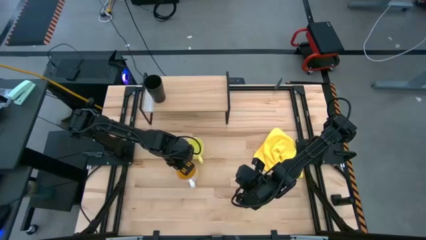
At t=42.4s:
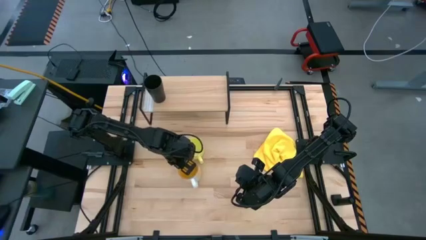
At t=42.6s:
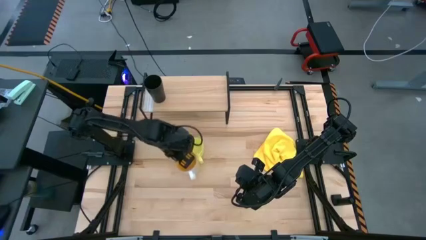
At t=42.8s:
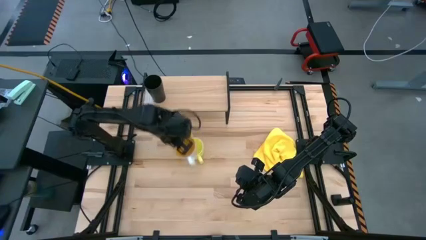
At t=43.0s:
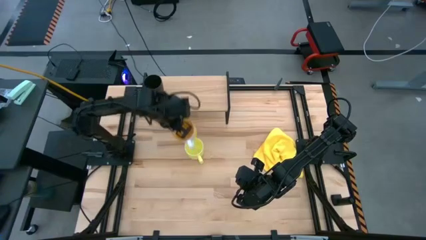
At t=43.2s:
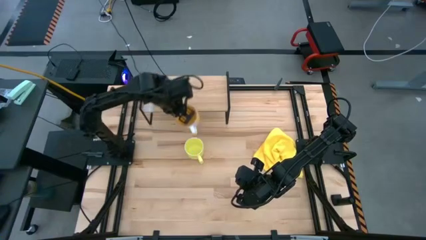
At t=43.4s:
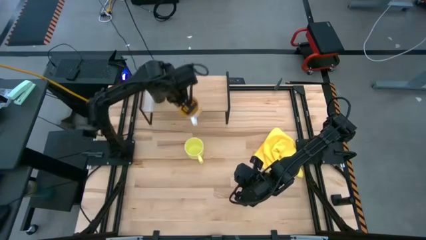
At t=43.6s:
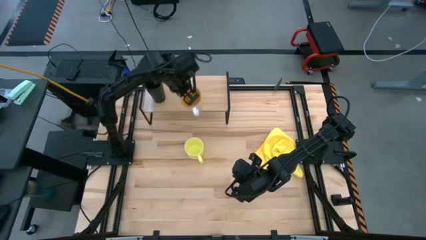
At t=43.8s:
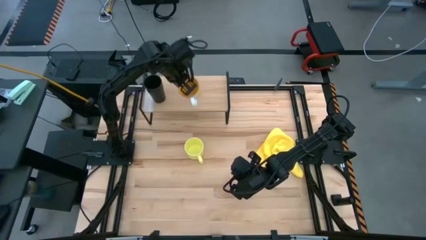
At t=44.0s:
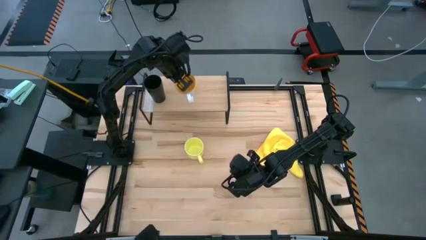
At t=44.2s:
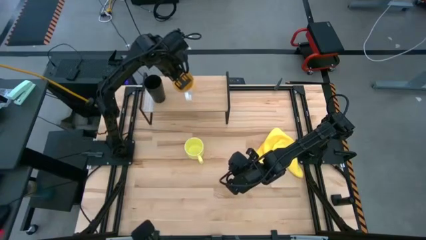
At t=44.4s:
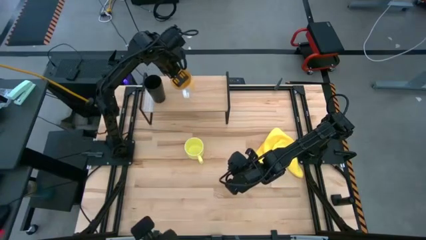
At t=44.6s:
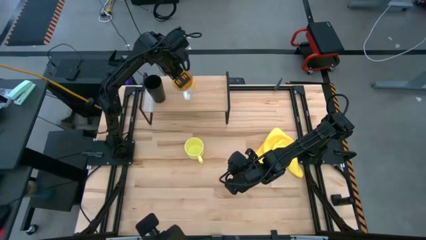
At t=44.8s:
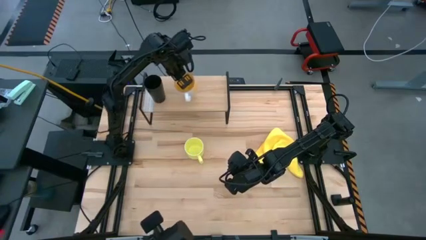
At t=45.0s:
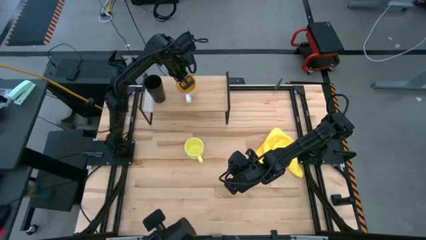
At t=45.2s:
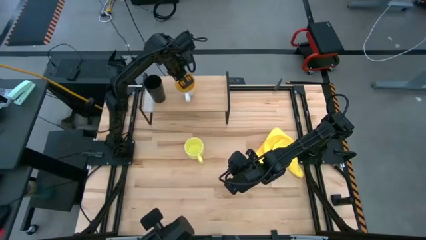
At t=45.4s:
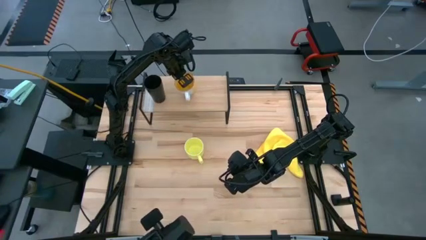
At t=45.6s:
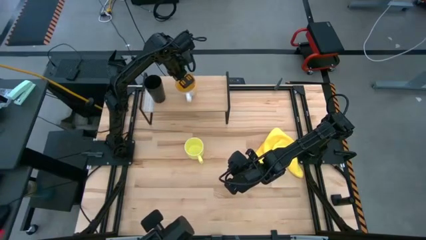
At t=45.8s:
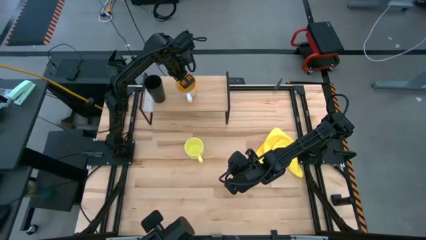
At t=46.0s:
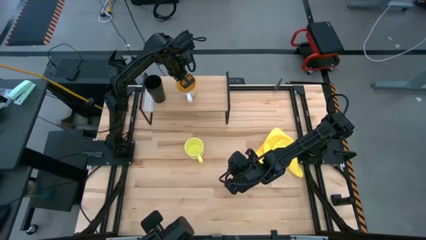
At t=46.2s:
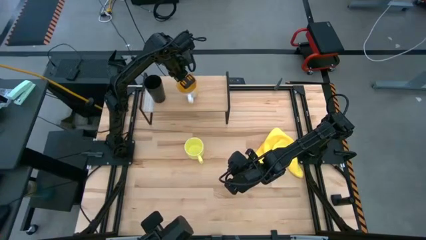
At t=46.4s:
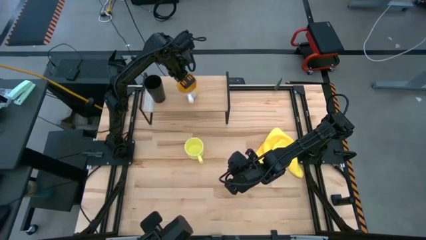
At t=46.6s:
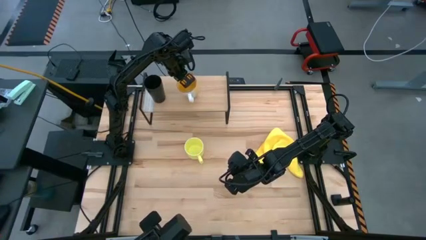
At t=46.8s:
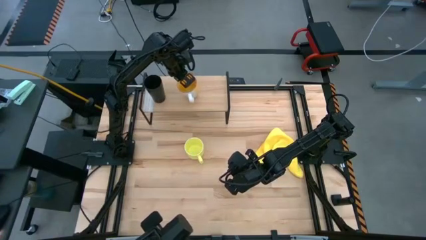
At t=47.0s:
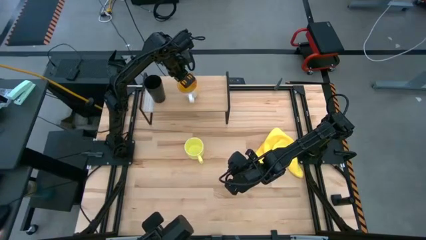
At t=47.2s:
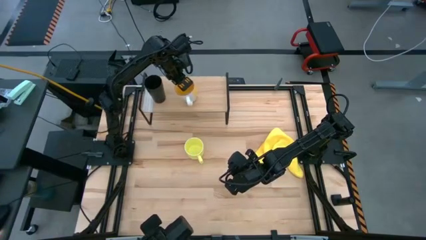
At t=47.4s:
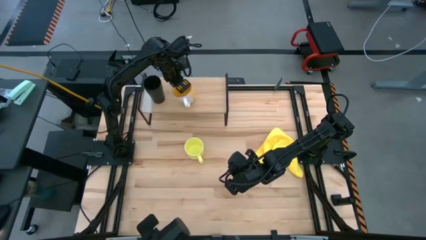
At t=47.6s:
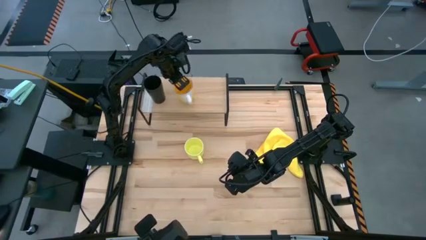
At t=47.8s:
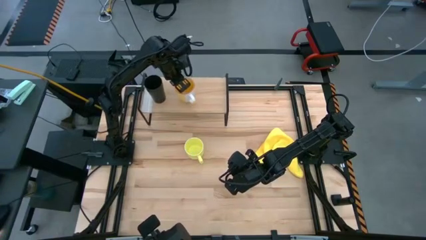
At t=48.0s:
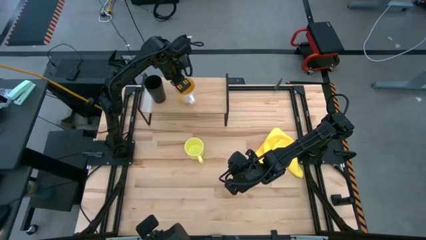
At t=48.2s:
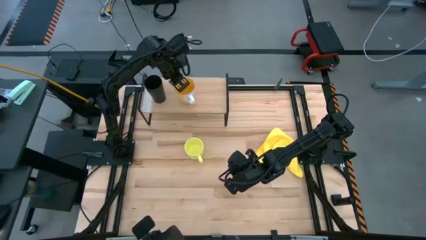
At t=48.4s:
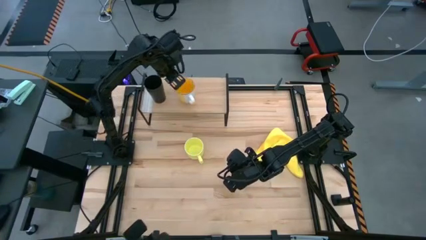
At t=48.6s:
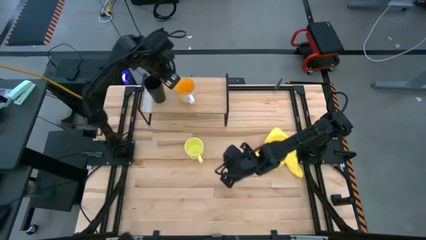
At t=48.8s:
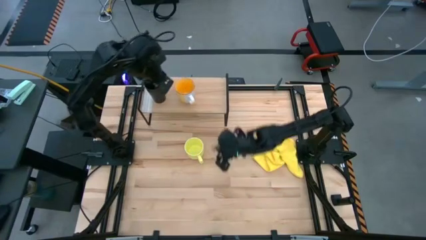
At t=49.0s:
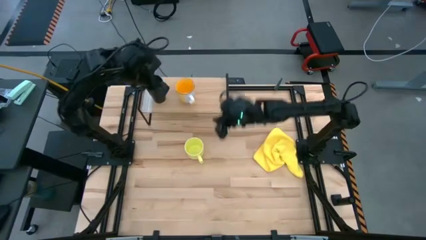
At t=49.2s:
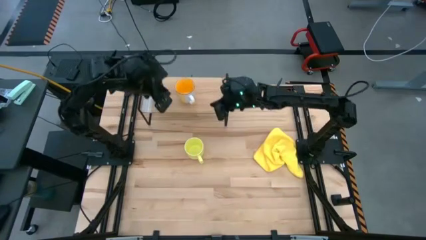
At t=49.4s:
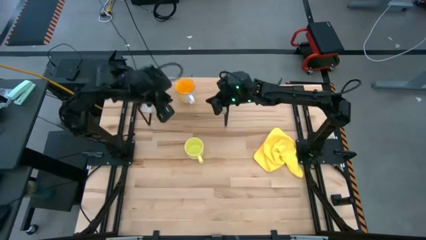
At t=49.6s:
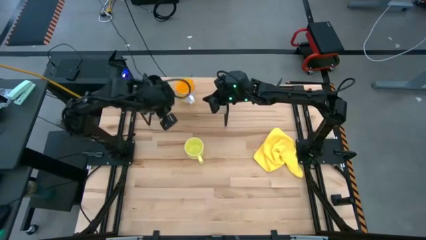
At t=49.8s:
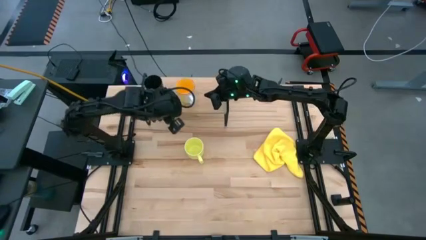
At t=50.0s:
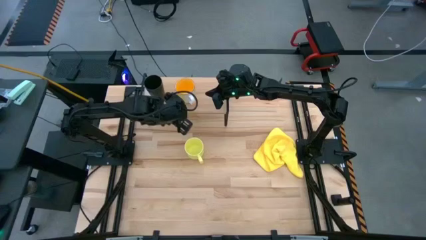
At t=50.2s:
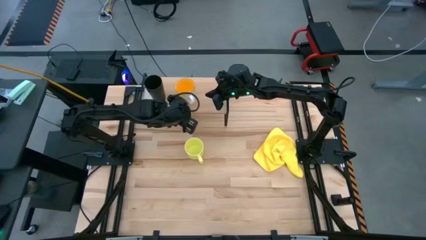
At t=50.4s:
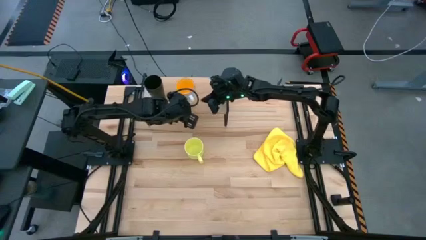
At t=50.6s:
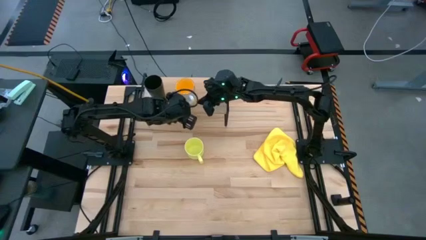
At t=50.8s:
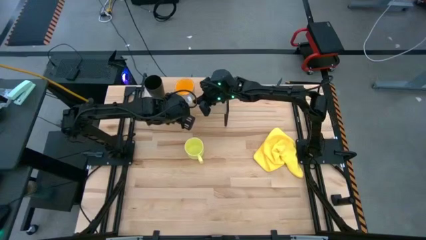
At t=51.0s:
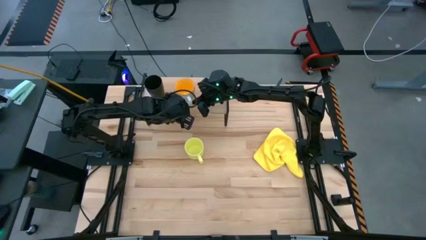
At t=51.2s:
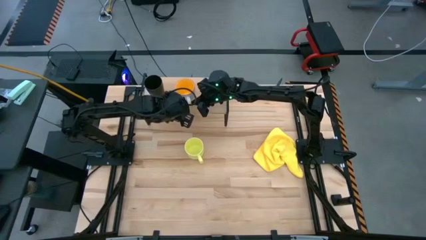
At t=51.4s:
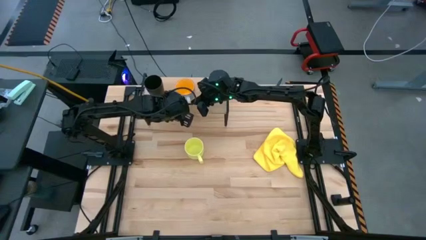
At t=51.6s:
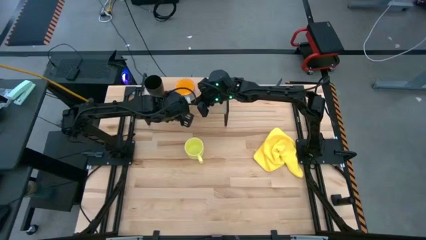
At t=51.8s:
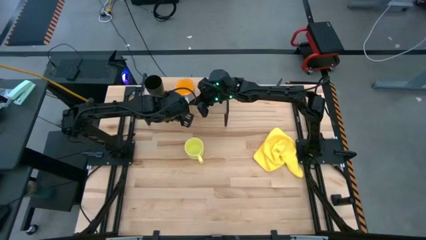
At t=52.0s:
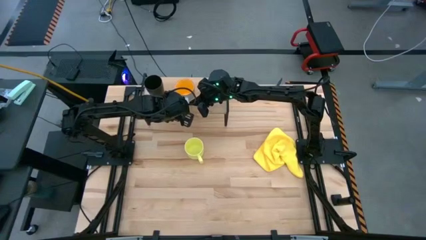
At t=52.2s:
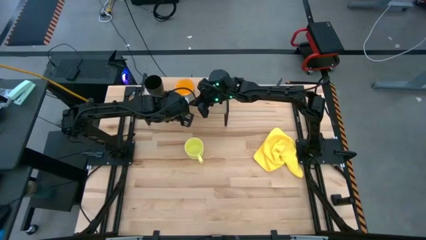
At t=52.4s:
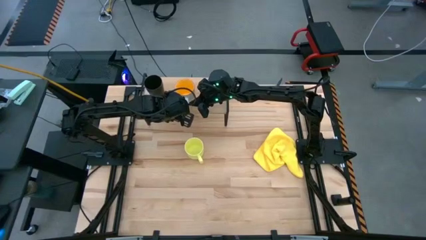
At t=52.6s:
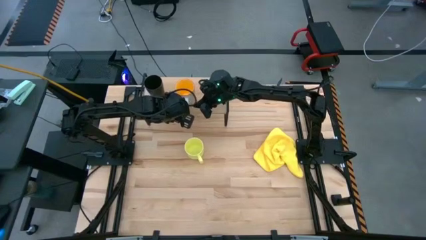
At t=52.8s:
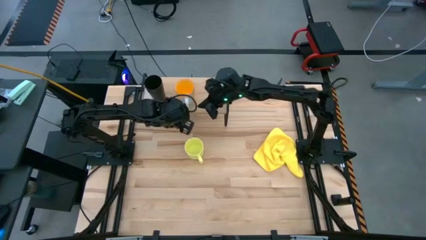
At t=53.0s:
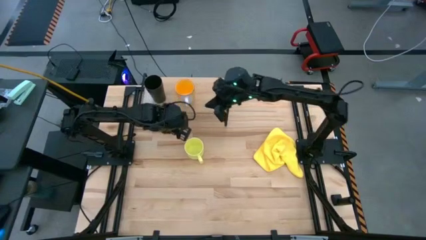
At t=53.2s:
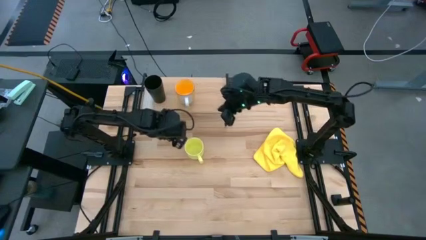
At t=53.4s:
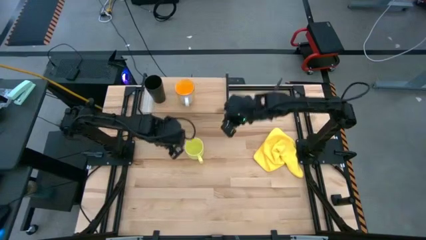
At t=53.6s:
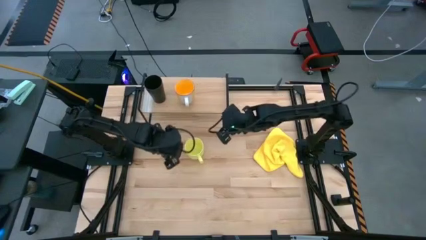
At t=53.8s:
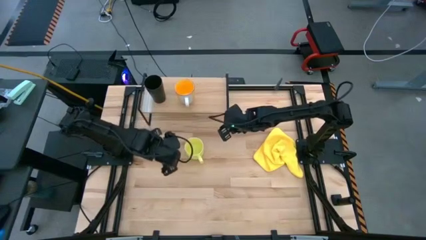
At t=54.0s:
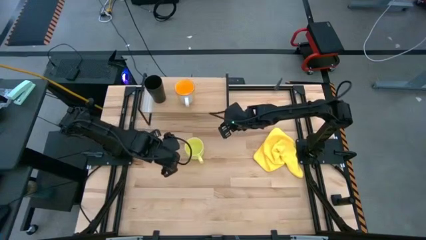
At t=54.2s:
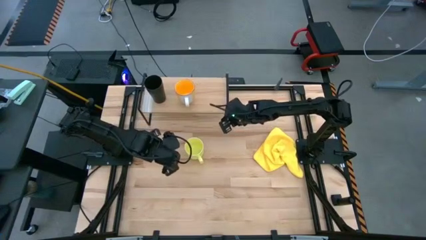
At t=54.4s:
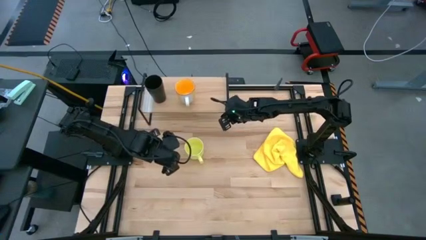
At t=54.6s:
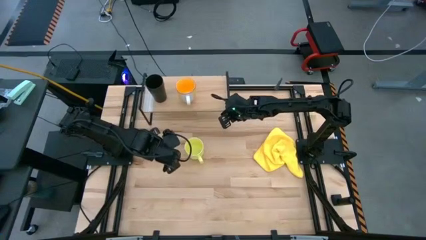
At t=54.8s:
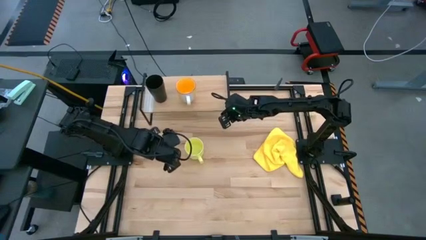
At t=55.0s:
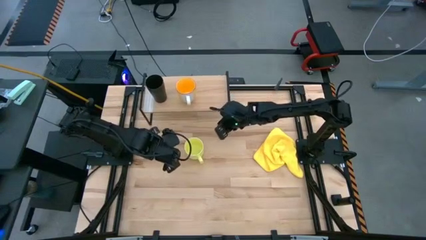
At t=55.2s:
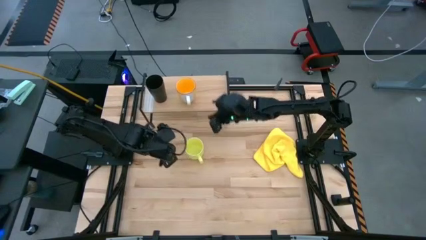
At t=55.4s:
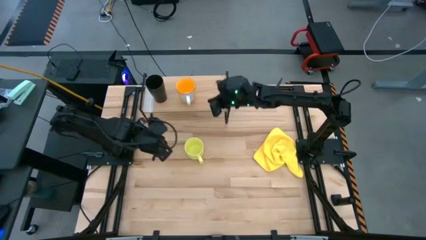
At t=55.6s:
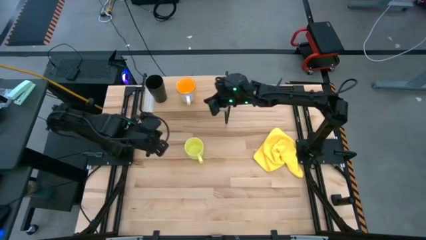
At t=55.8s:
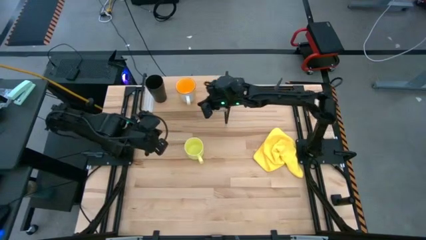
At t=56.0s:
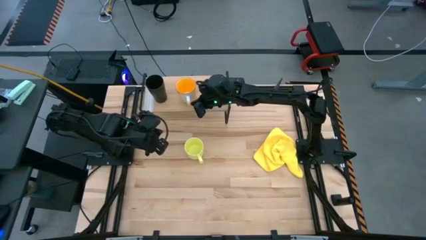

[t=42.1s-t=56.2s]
Task: Stack small to large cups/mugs on shelf
Put the orange mug on the shelf
